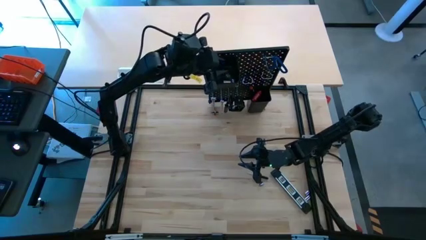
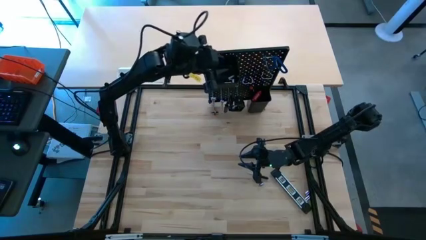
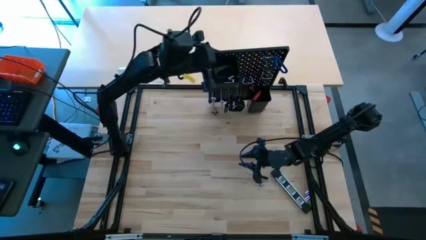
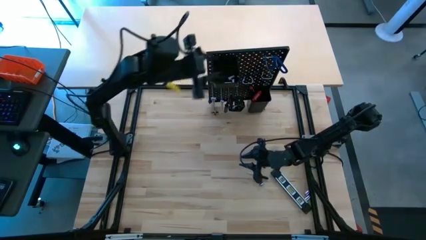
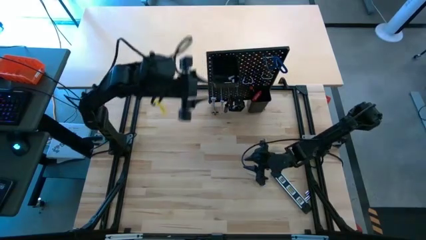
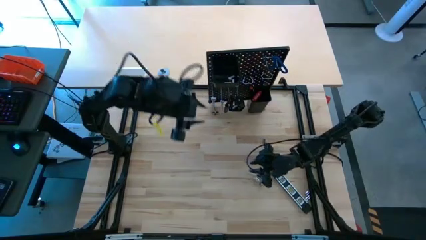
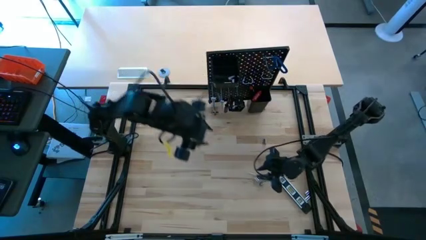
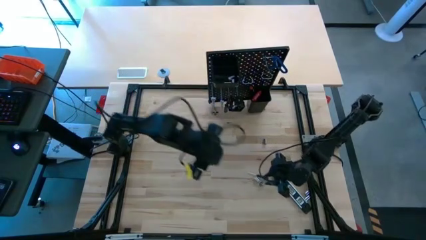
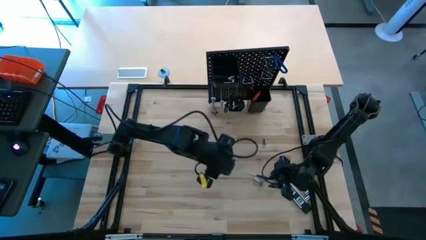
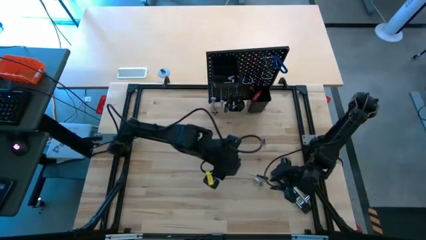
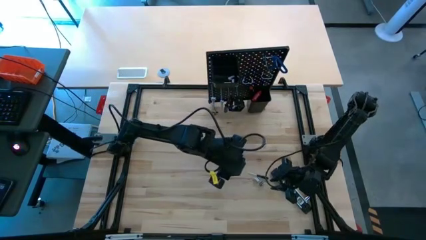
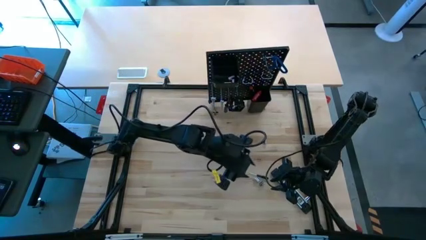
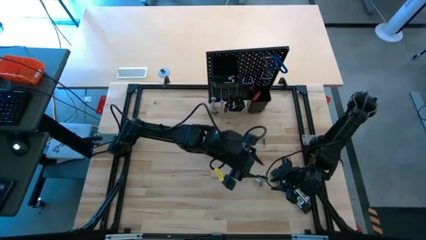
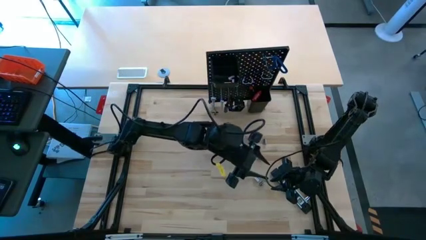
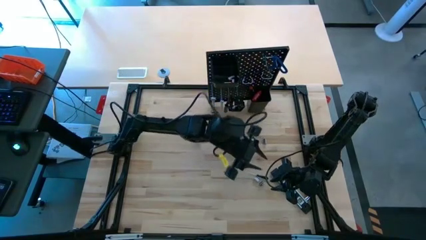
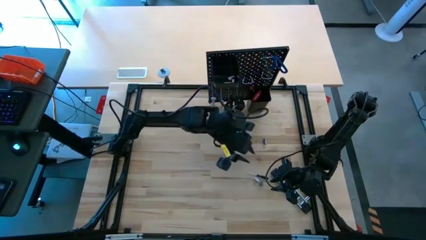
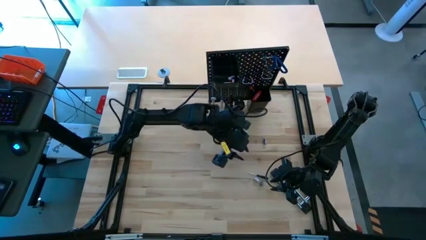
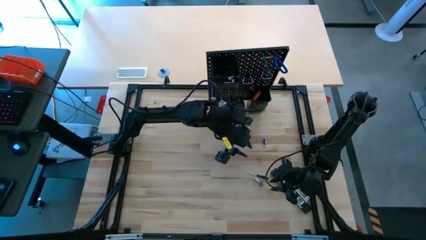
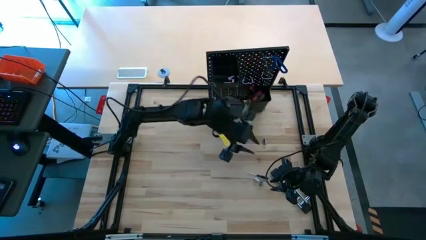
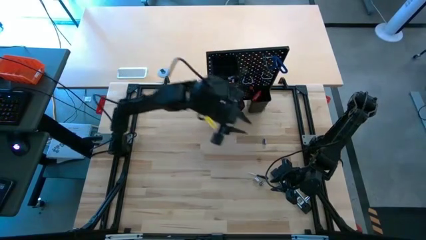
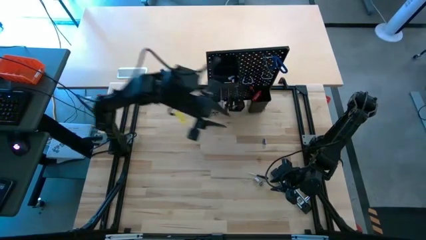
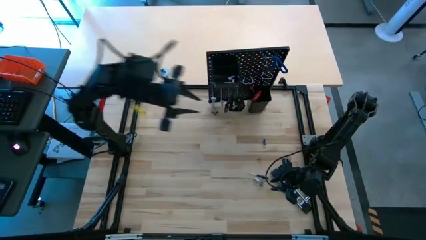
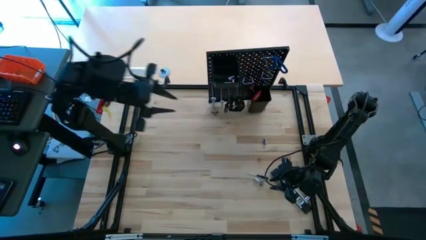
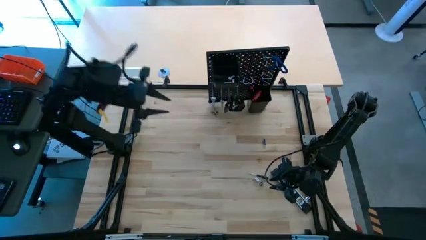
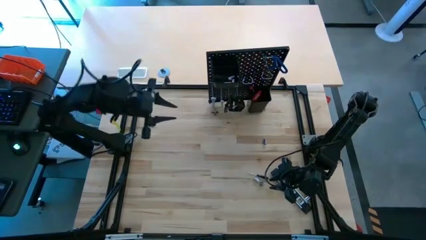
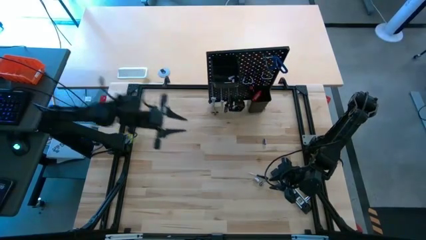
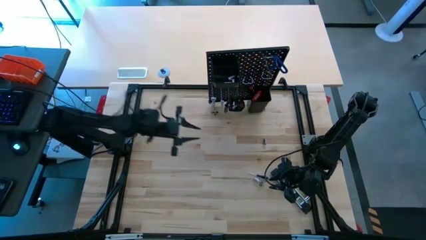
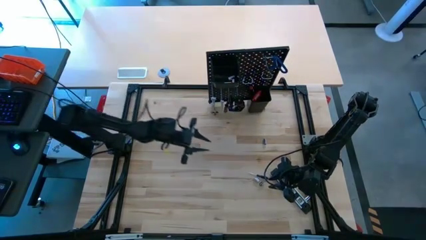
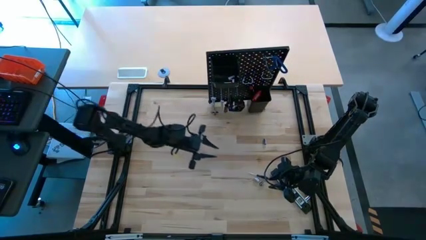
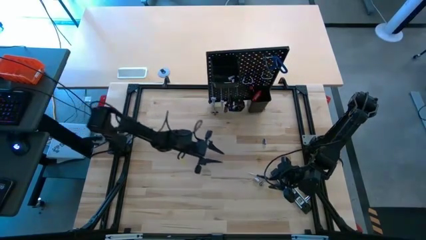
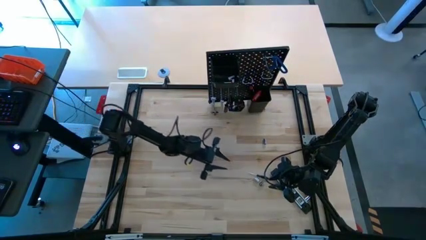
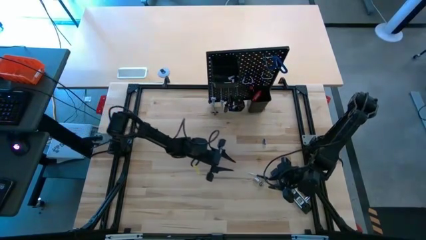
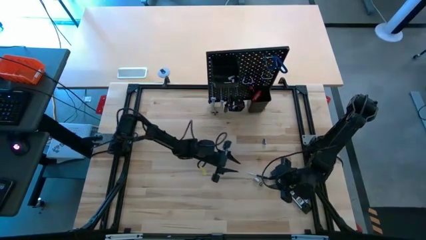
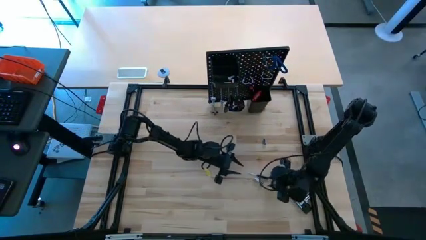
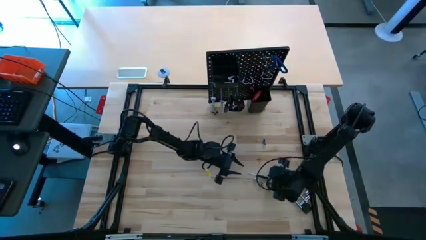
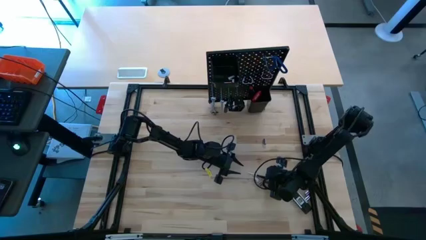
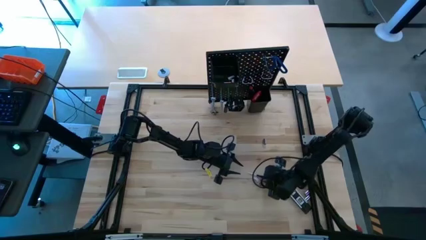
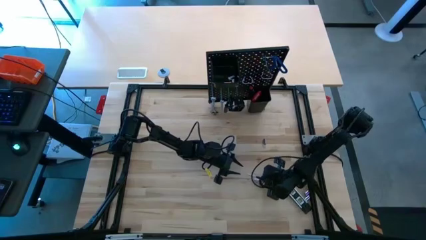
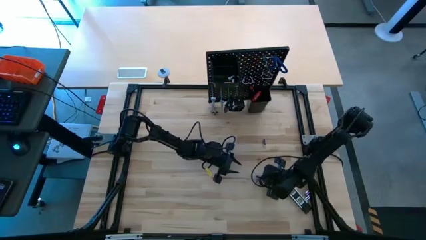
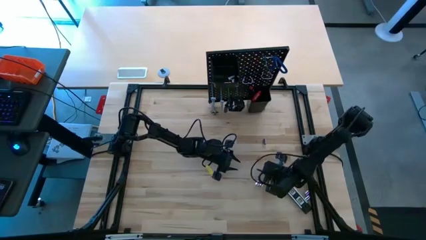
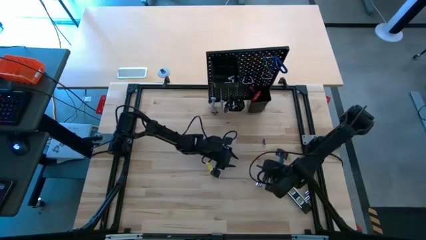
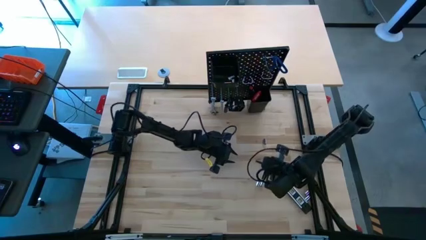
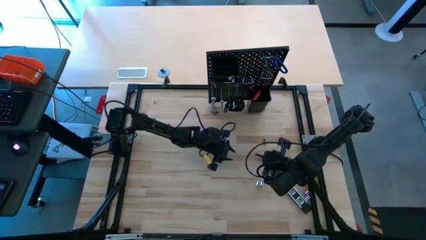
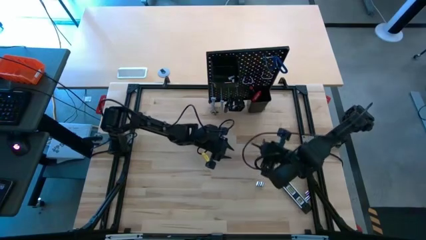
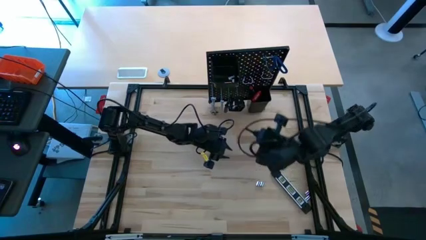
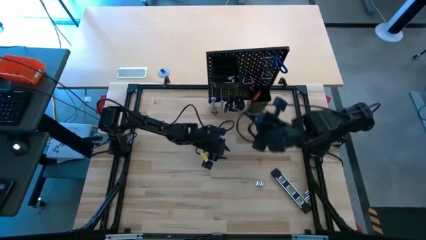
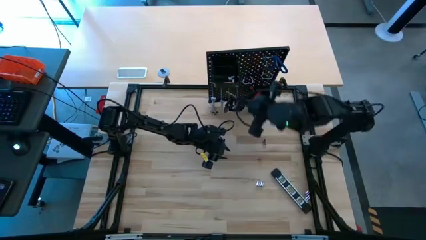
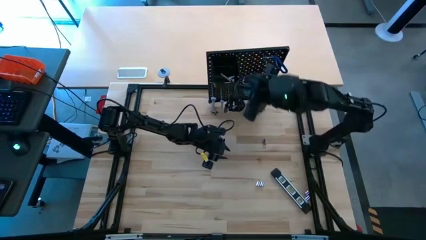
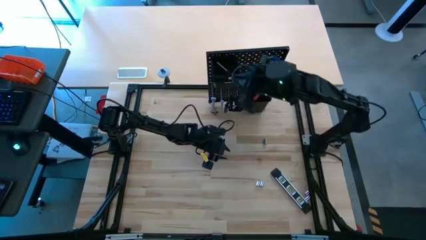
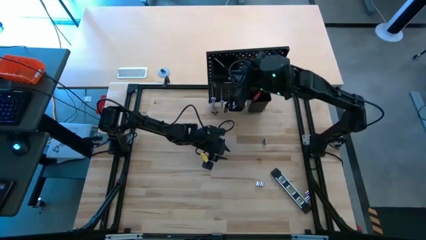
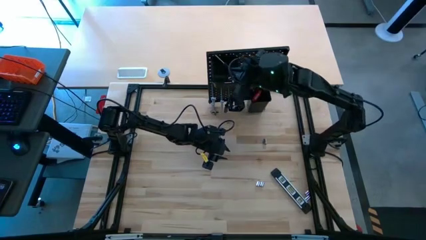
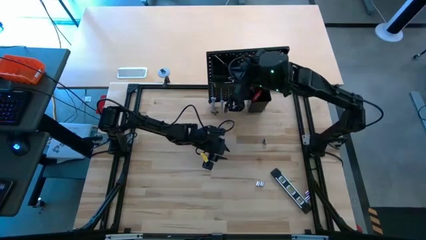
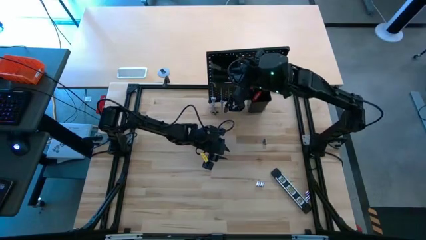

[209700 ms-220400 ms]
Task: Hang tools onto peg board
Put the black screwdriver into the top black bin on the peg board

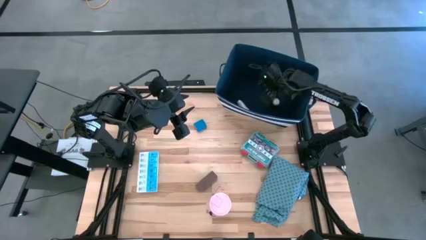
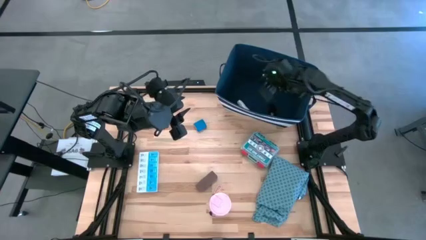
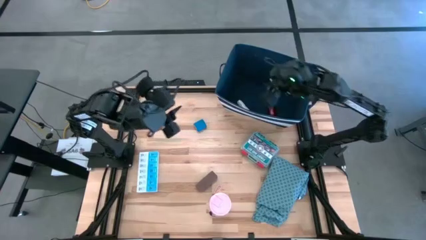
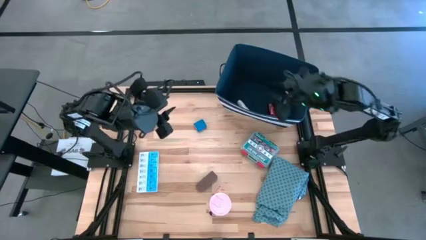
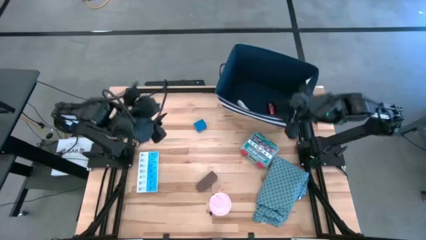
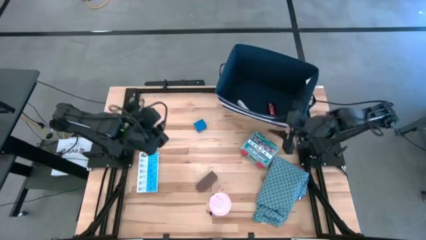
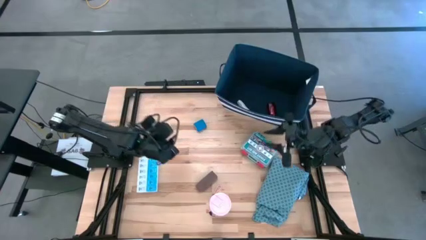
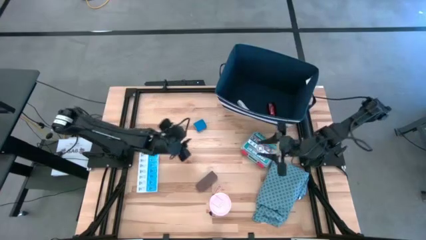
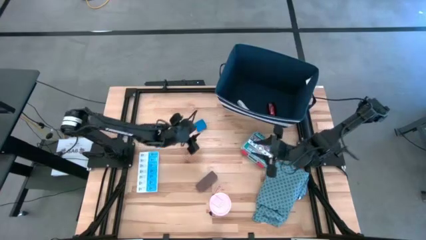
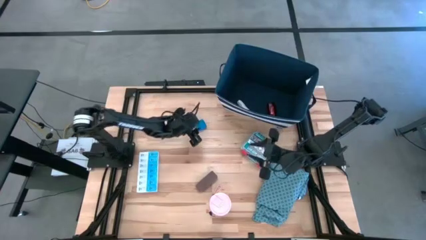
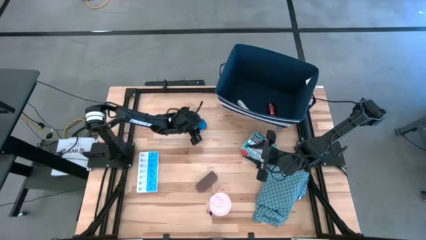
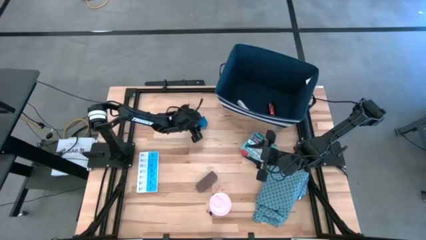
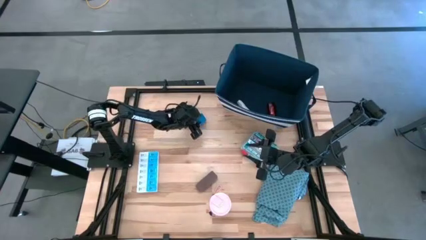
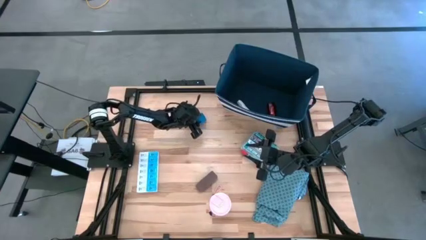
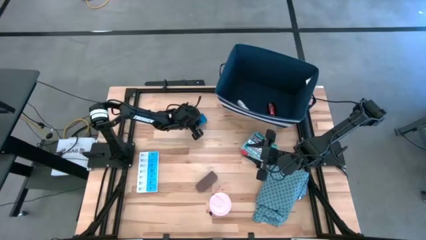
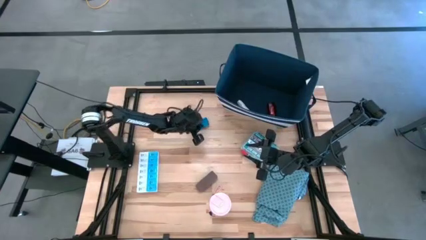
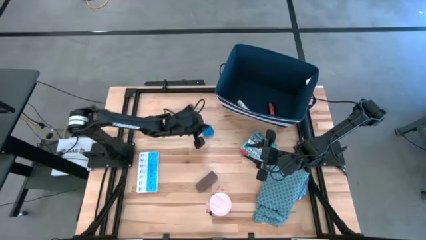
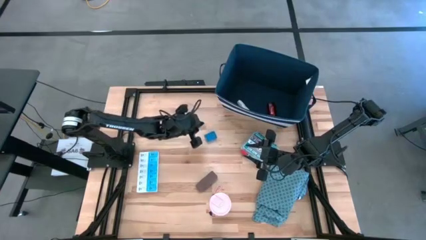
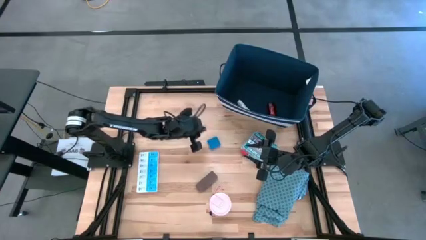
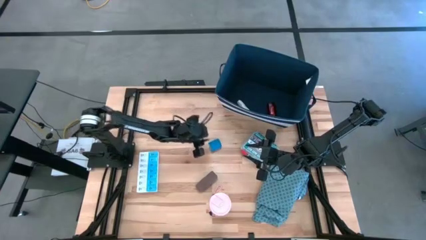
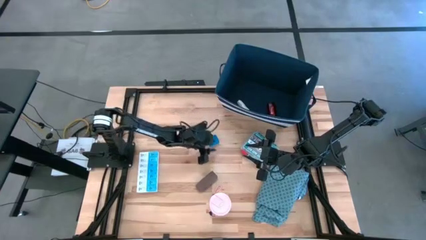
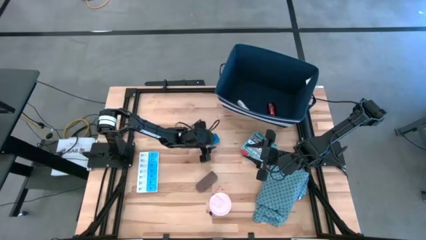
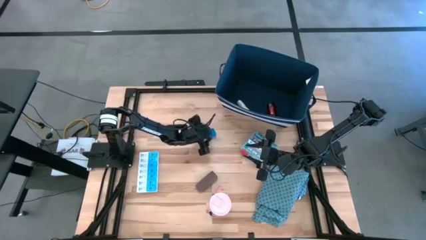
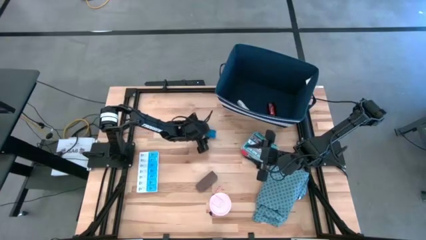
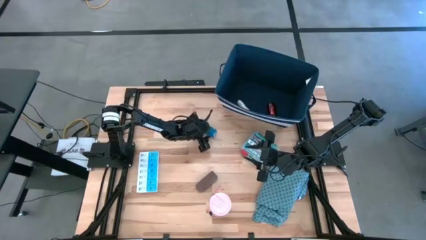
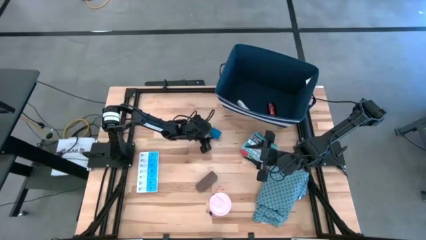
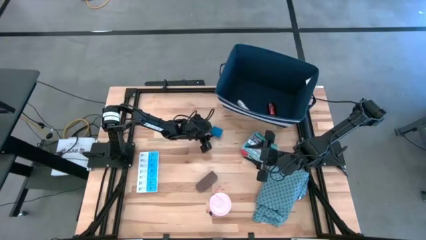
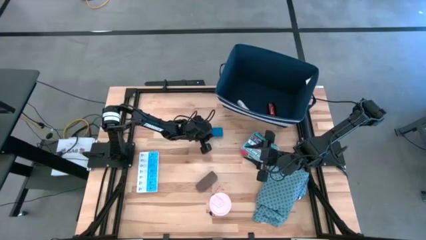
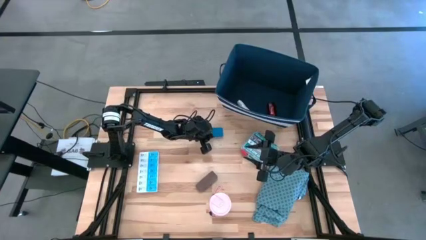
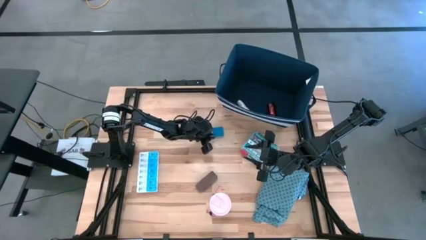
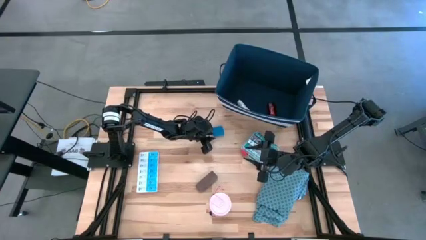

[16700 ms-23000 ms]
Task: Pick & place medical supplies in basket/bin
Put the blue bandage into the white bin
